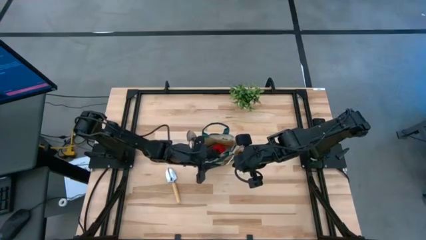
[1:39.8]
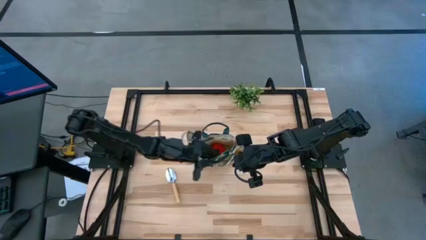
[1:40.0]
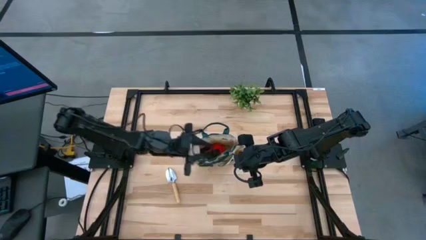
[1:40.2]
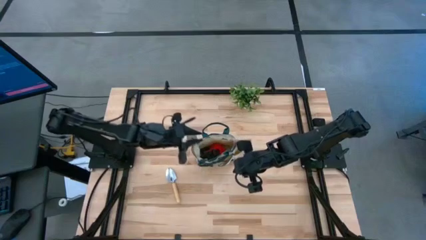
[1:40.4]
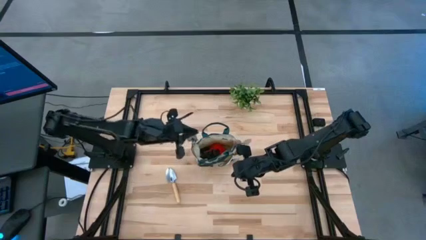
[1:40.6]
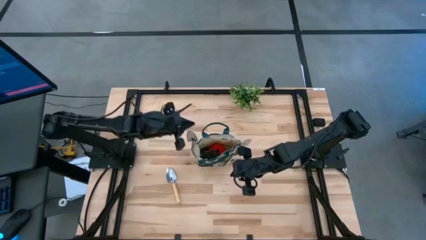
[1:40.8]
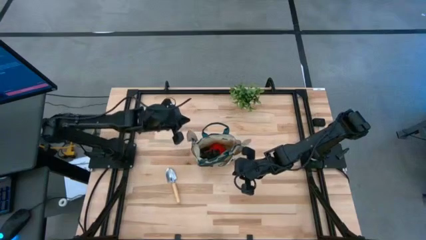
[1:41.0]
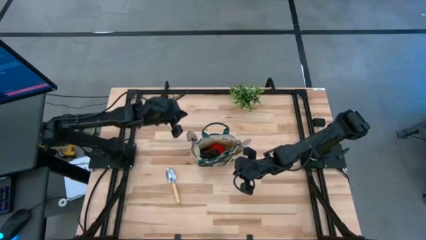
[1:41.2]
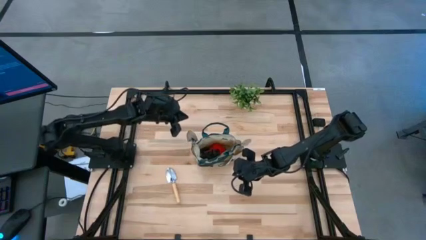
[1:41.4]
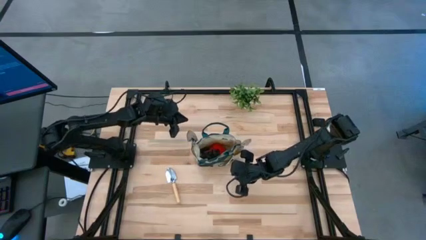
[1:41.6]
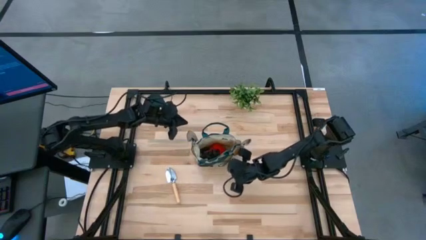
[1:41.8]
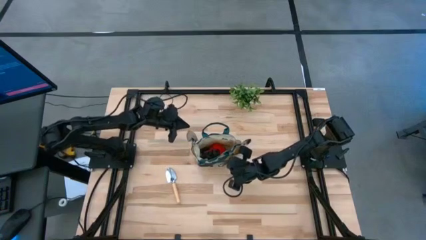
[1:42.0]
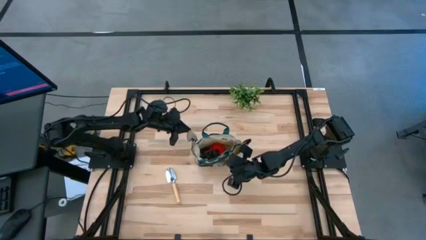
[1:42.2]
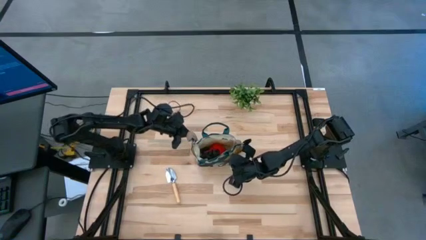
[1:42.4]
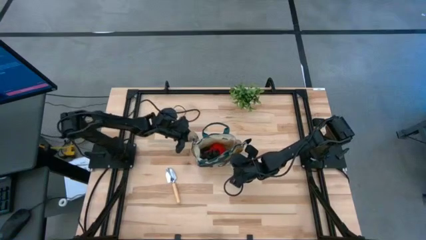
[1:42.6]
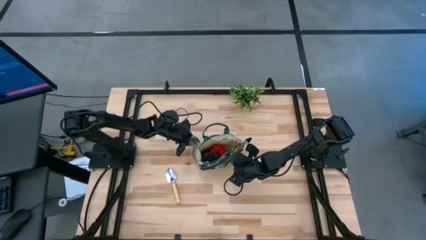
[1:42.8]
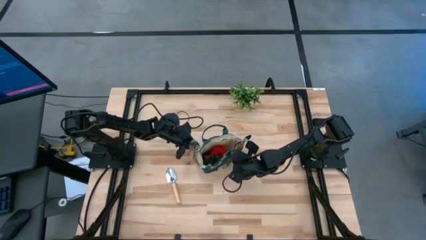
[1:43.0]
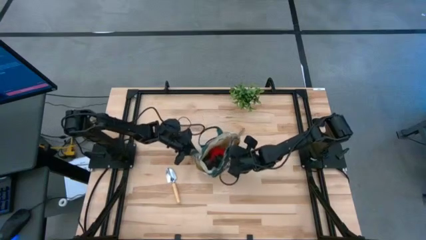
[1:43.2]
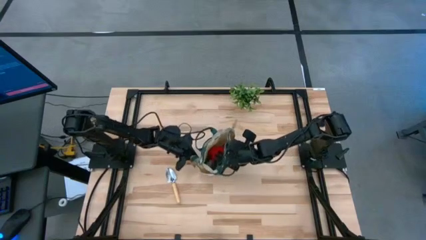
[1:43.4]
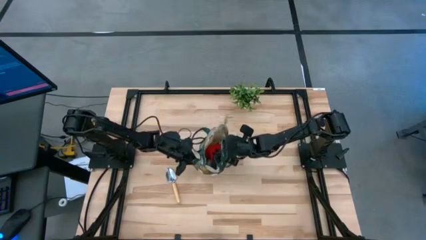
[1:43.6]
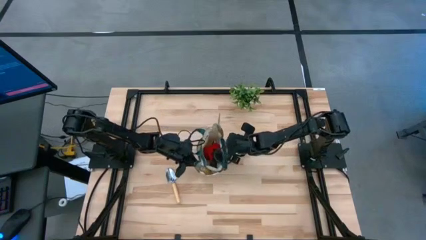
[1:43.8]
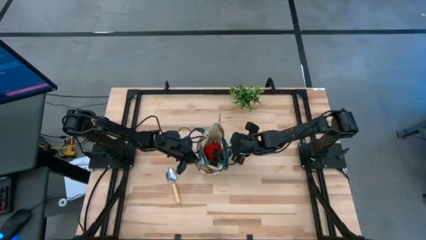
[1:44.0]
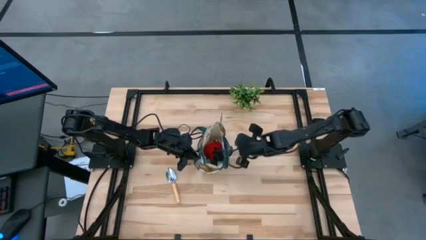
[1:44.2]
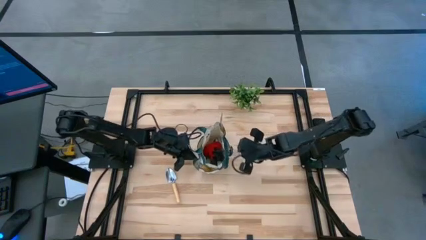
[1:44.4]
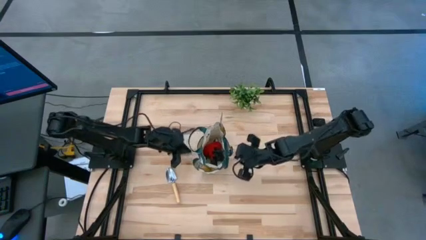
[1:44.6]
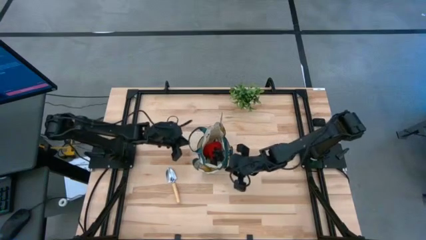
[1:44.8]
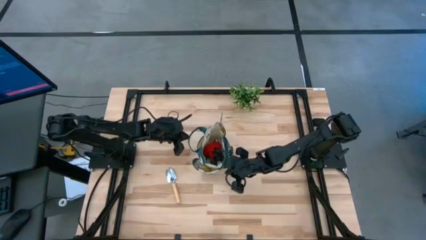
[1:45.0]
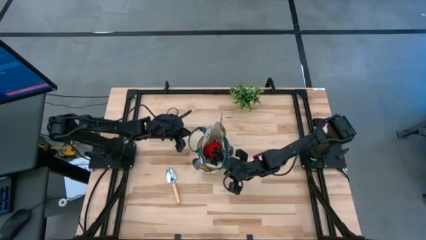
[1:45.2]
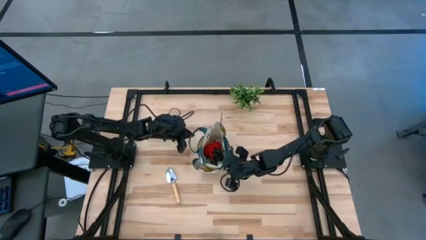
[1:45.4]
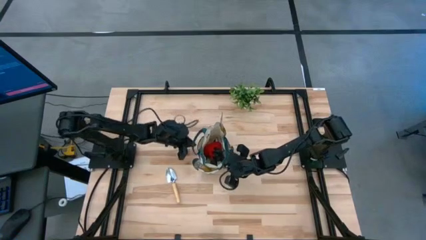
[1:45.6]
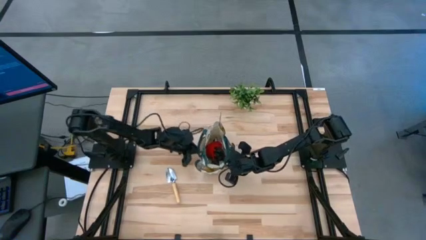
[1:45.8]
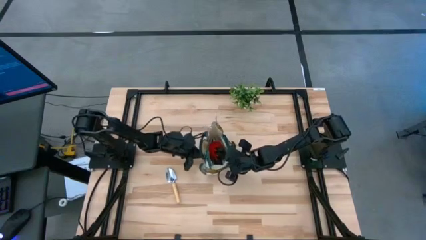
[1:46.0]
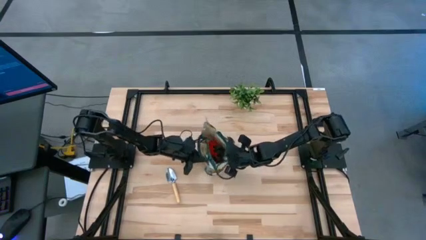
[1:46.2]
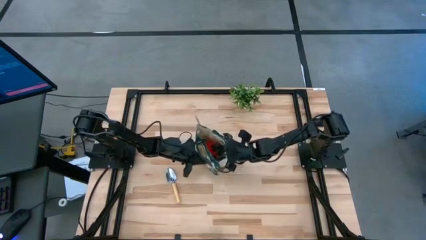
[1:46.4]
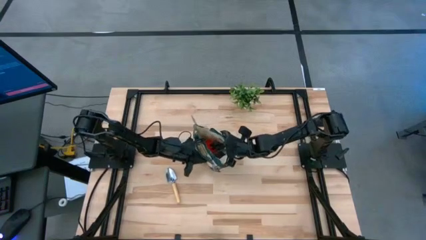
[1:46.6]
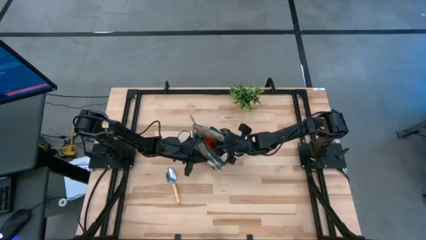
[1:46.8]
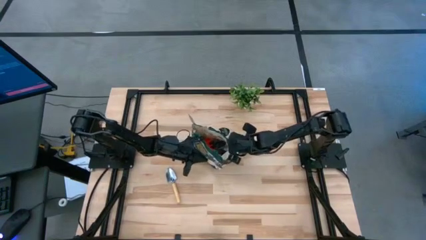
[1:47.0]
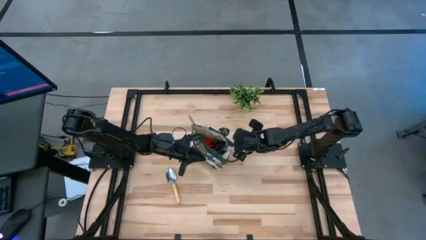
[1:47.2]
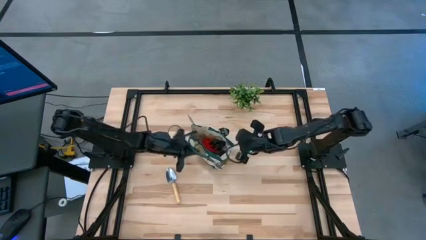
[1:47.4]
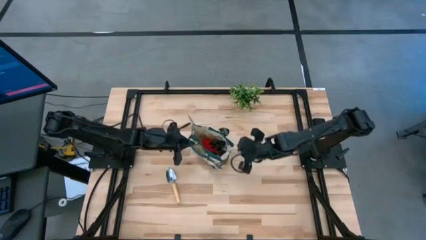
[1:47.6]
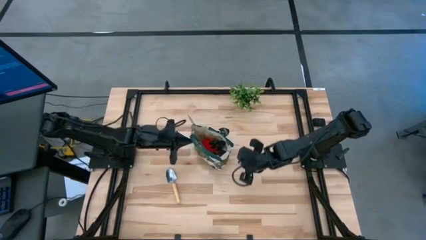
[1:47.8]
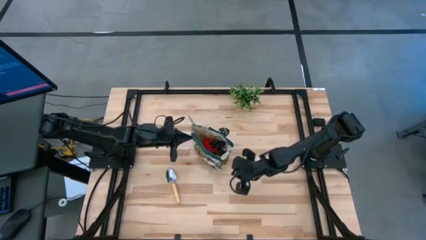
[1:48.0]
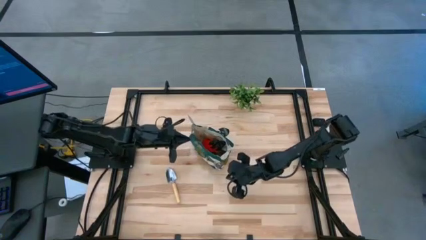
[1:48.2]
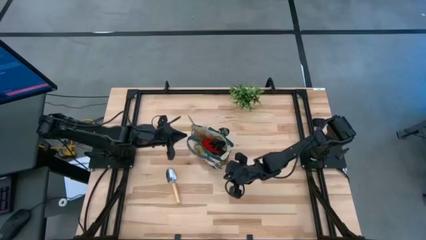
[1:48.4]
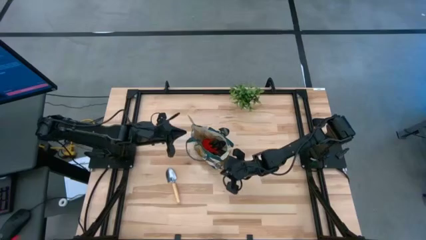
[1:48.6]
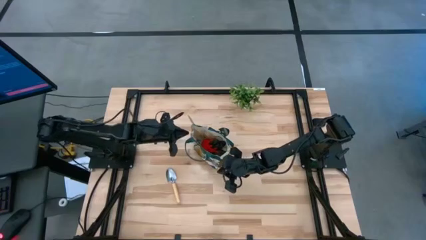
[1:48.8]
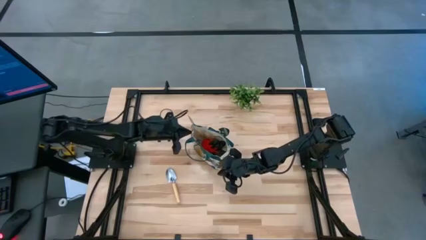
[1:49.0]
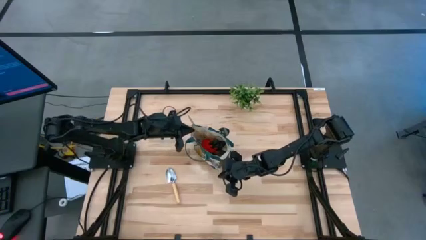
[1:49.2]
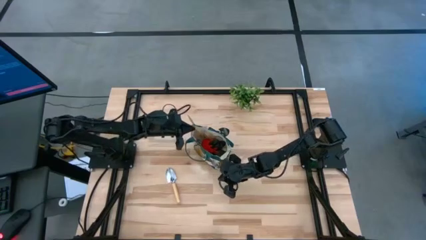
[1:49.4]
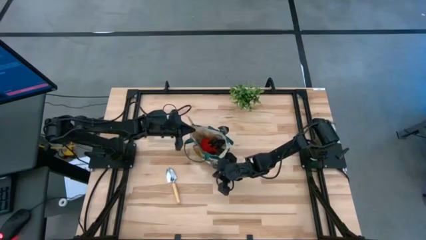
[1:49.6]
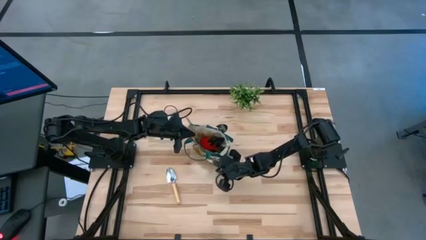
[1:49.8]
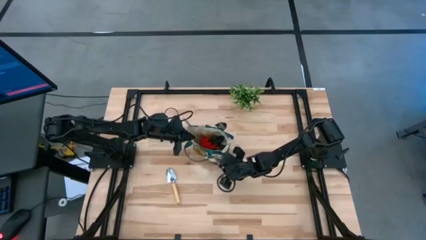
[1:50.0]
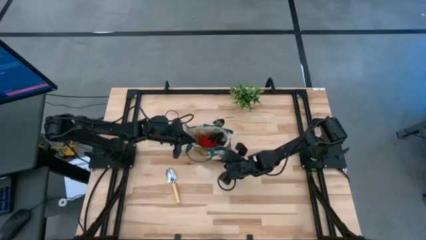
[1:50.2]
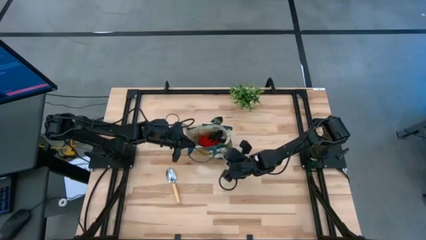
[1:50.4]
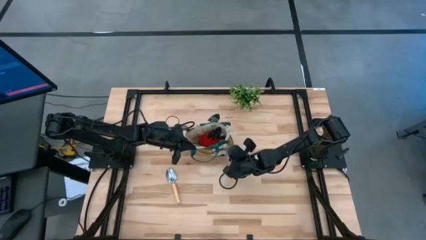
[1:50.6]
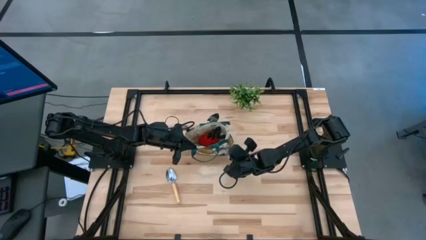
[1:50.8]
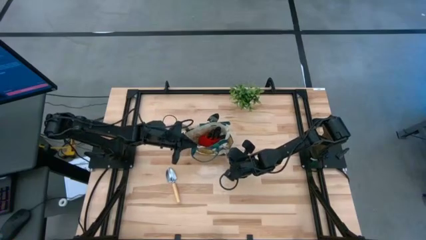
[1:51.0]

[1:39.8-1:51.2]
Task: Pick & Place Garden tools in Gardening bag
Adjust the gardening bag

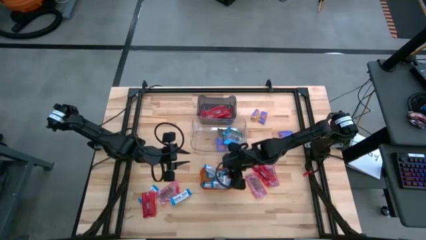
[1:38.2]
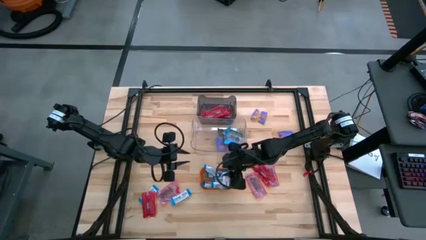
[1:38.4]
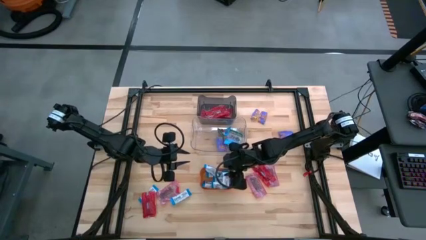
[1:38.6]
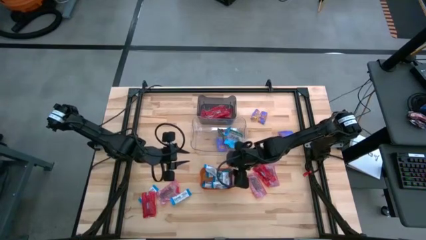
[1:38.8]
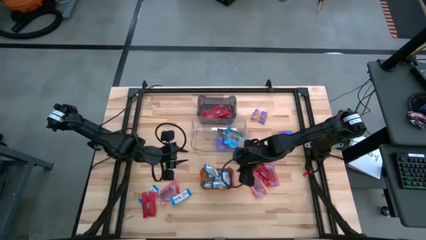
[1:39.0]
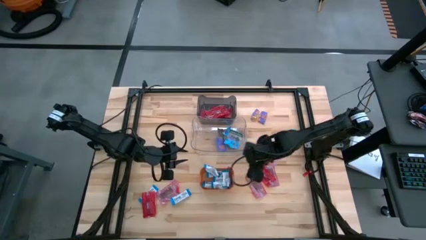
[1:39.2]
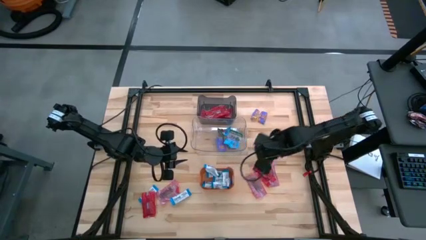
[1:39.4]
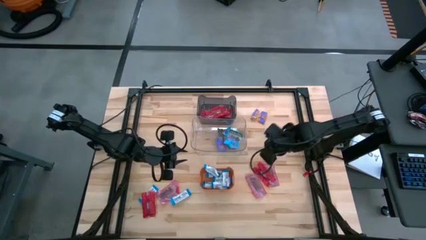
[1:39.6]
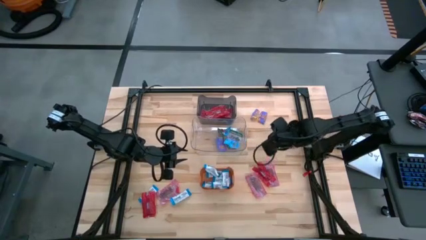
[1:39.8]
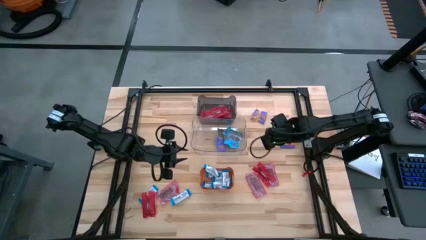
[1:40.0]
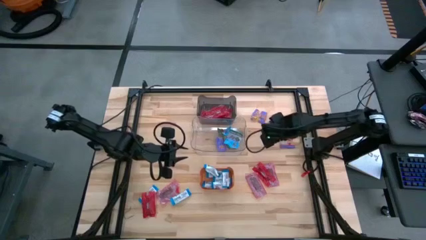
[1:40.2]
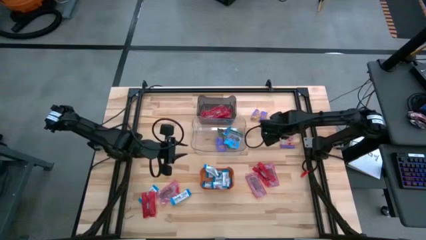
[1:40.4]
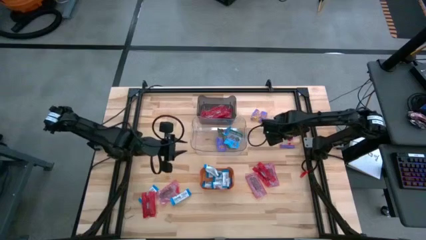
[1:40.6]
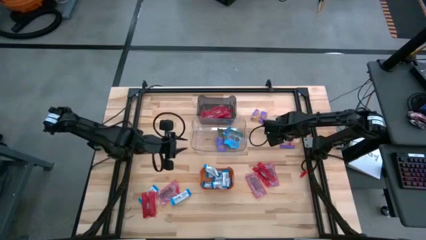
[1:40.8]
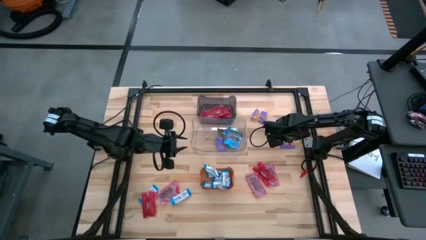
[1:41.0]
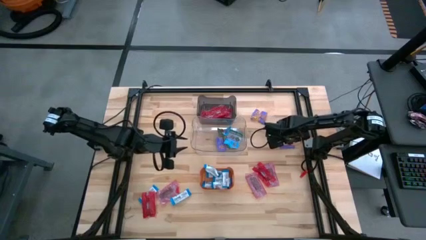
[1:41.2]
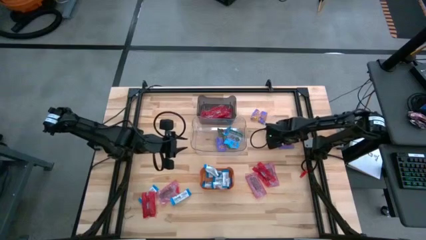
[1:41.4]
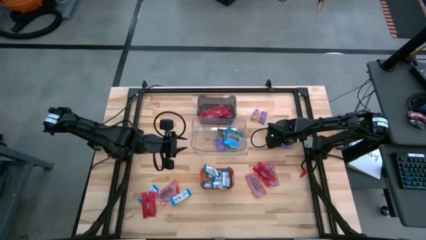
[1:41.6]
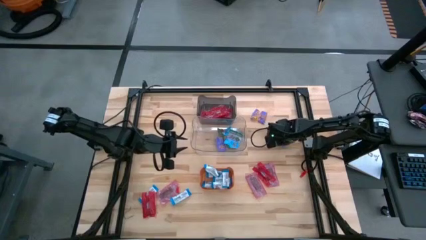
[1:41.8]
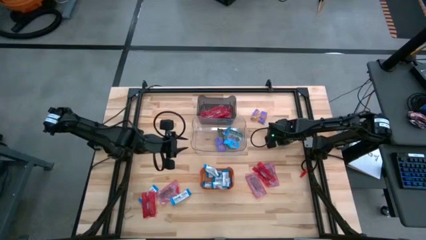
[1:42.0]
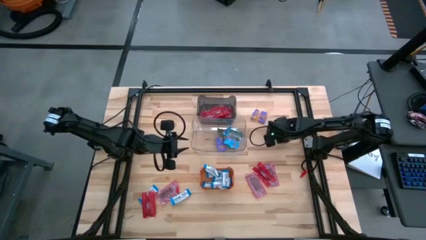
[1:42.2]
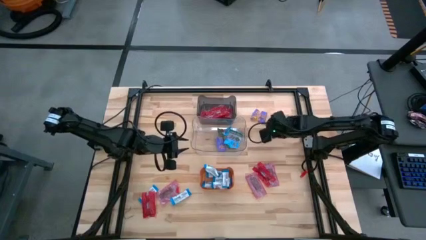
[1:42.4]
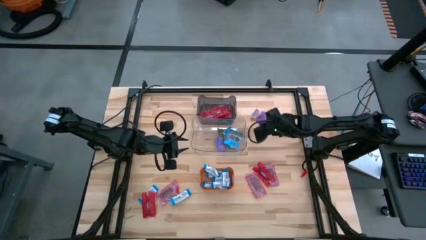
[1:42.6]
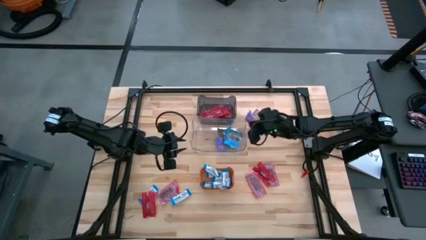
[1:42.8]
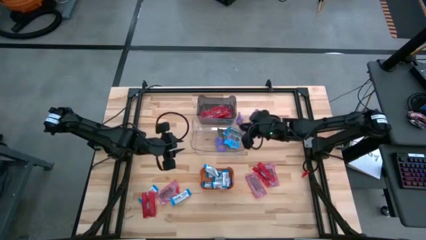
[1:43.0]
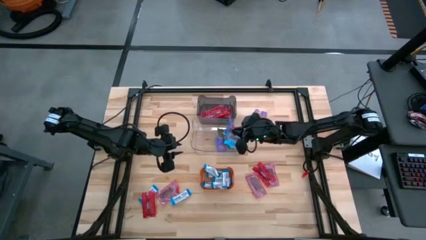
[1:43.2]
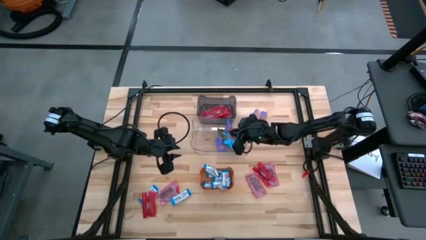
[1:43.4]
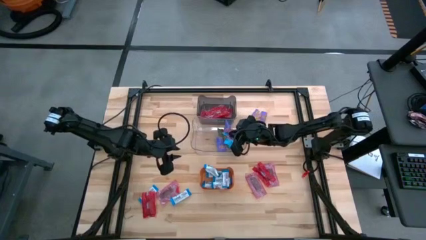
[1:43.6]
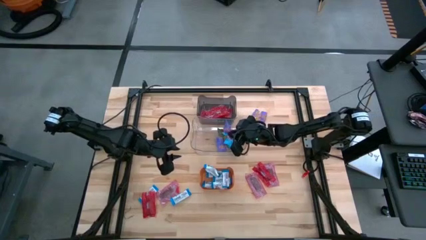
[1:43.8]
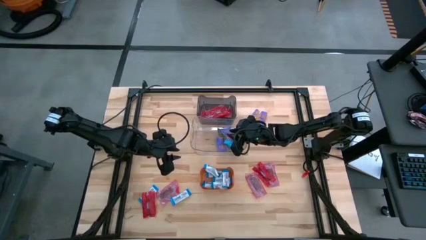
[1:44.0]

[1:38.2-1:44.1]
Task: Sort candy
Put the blue candy into the clear transparent bin
